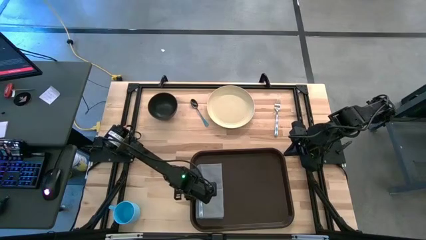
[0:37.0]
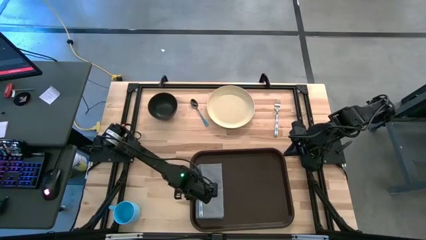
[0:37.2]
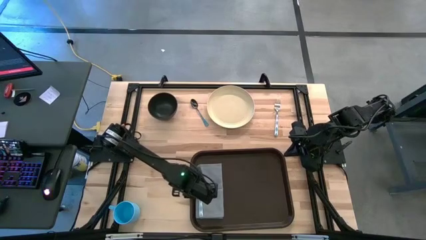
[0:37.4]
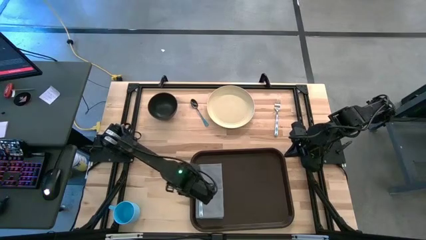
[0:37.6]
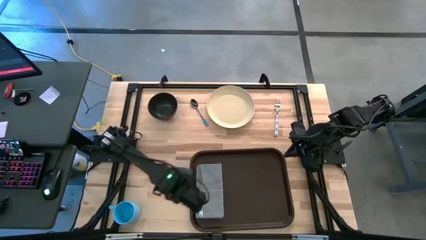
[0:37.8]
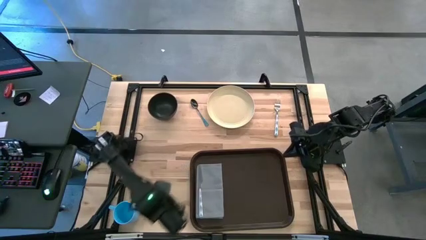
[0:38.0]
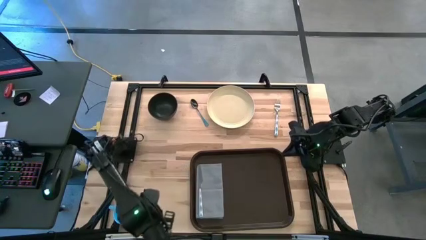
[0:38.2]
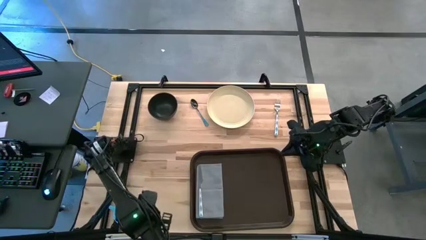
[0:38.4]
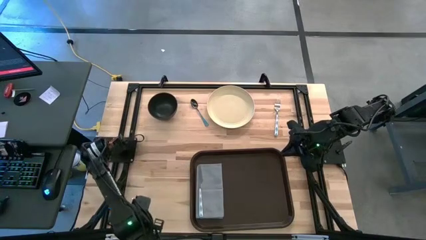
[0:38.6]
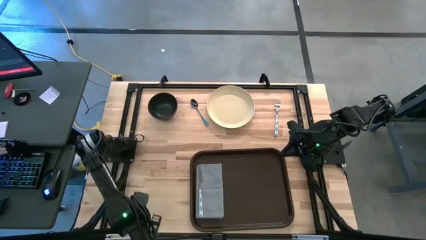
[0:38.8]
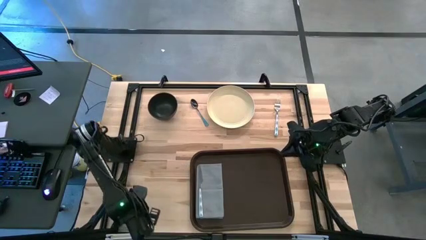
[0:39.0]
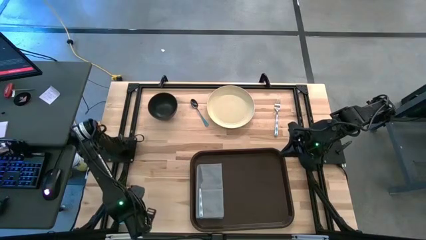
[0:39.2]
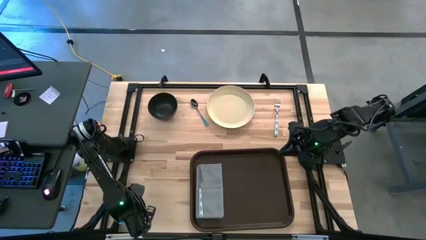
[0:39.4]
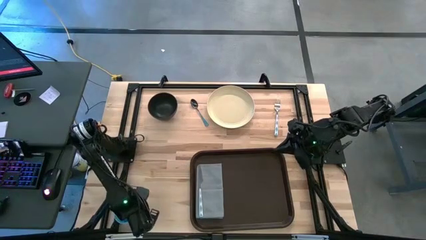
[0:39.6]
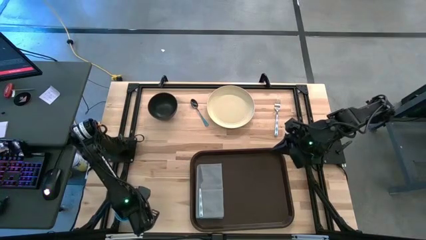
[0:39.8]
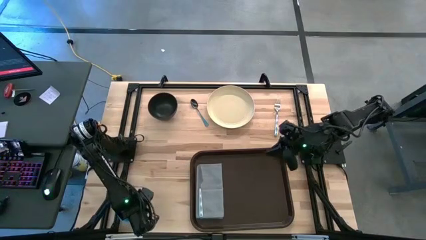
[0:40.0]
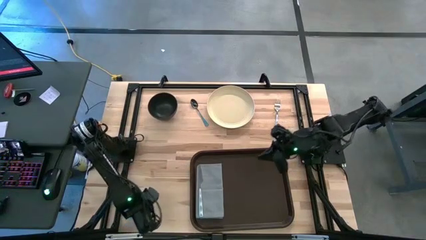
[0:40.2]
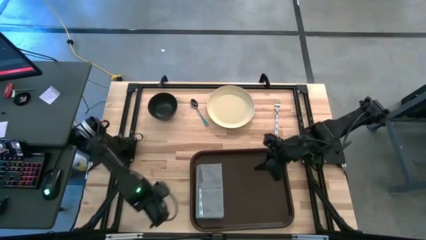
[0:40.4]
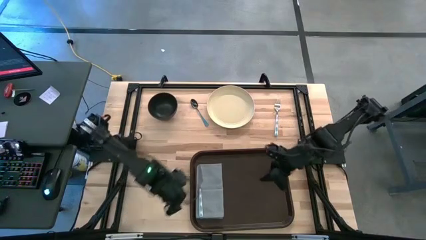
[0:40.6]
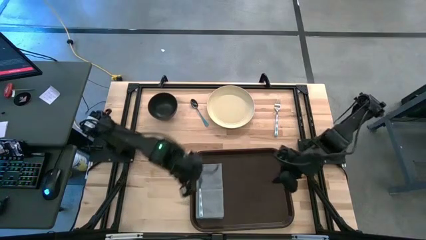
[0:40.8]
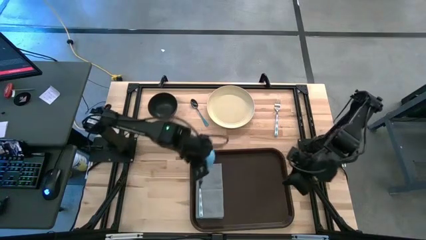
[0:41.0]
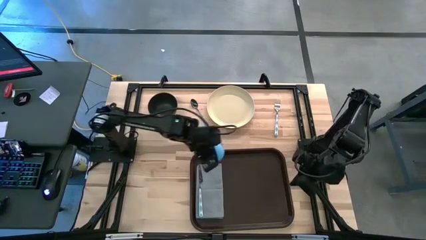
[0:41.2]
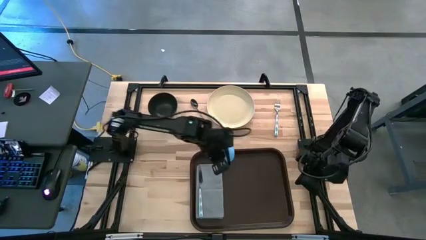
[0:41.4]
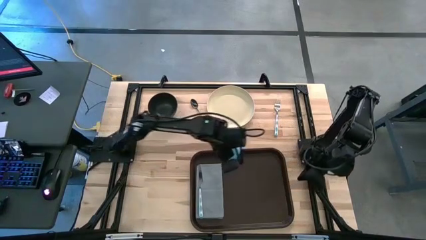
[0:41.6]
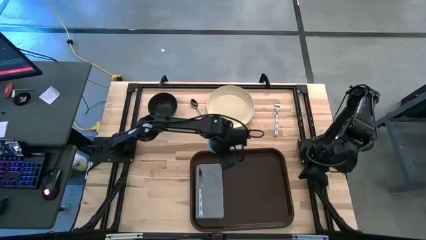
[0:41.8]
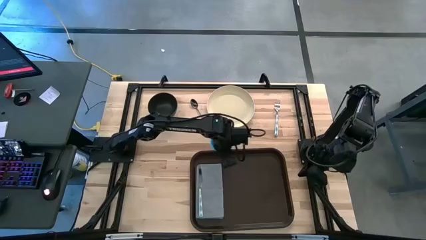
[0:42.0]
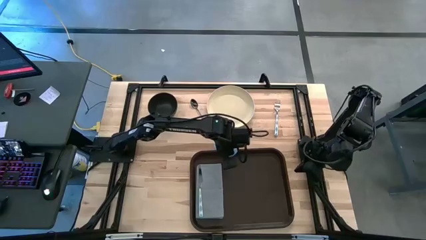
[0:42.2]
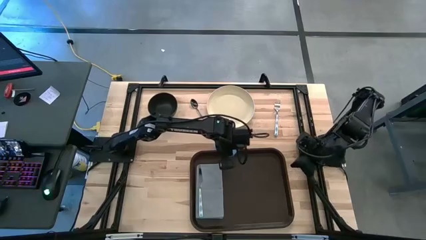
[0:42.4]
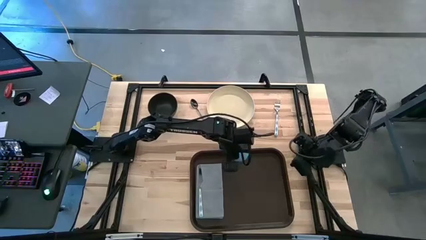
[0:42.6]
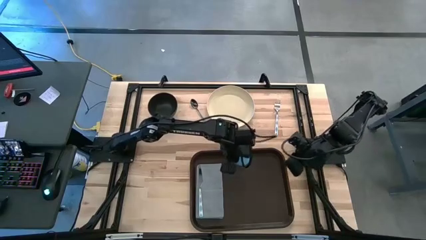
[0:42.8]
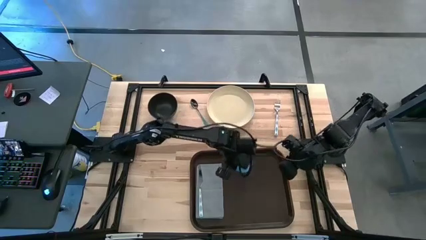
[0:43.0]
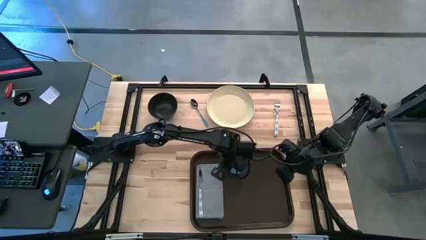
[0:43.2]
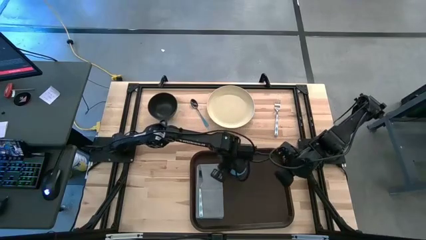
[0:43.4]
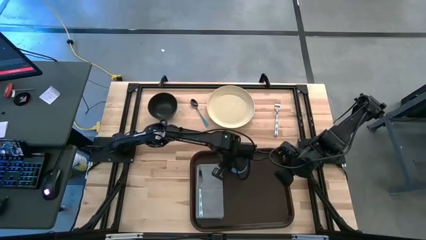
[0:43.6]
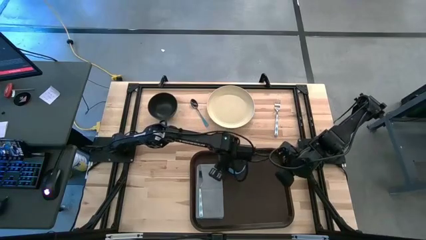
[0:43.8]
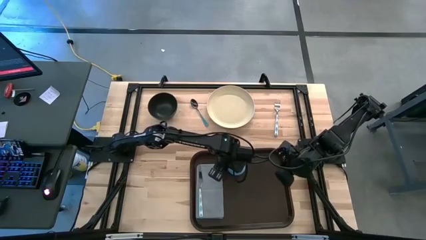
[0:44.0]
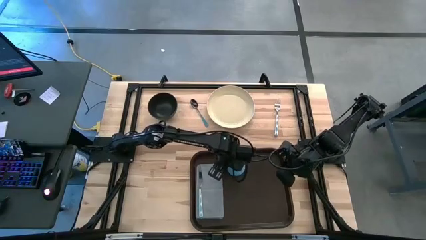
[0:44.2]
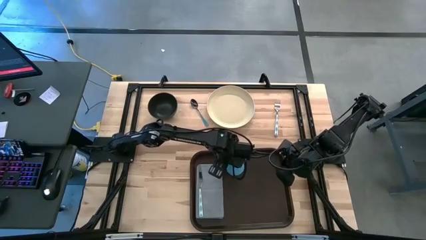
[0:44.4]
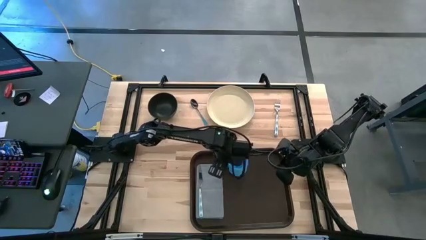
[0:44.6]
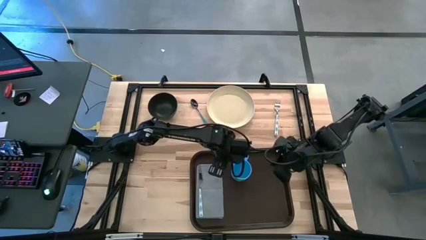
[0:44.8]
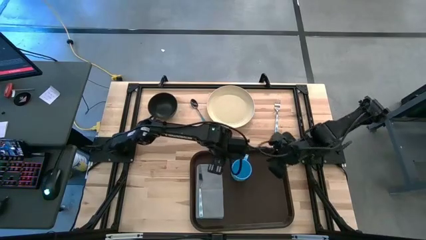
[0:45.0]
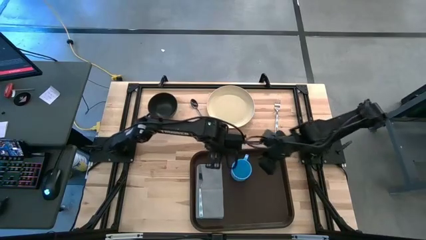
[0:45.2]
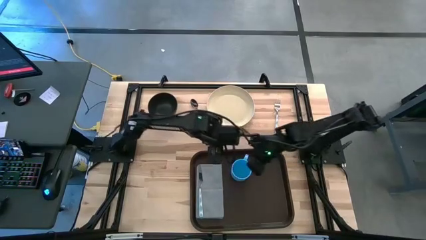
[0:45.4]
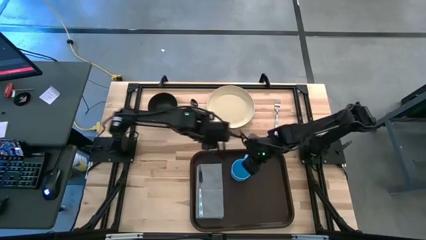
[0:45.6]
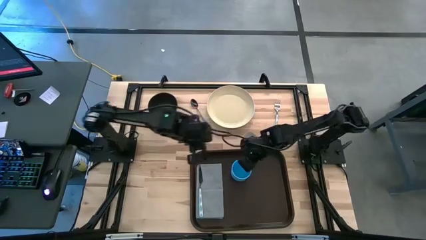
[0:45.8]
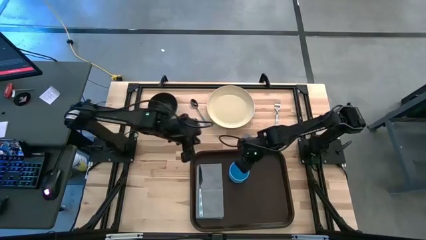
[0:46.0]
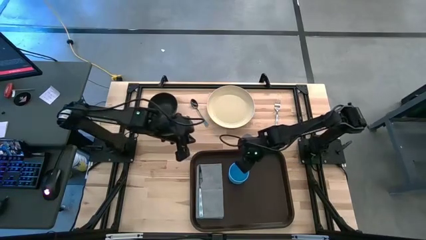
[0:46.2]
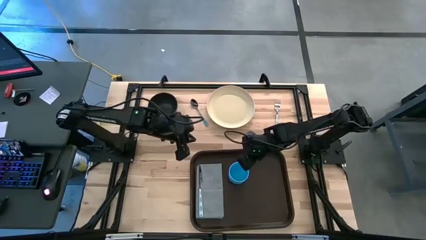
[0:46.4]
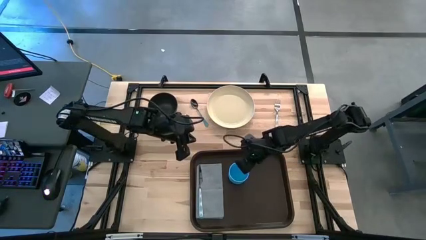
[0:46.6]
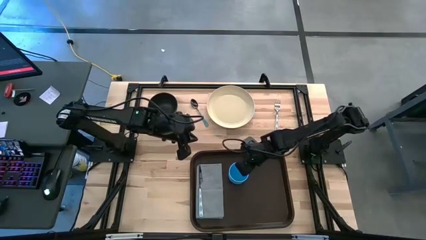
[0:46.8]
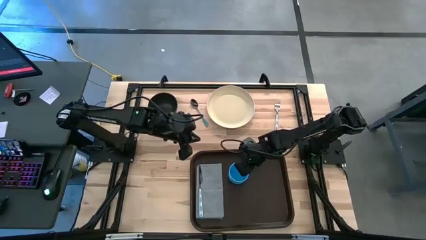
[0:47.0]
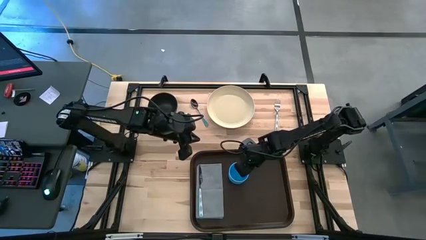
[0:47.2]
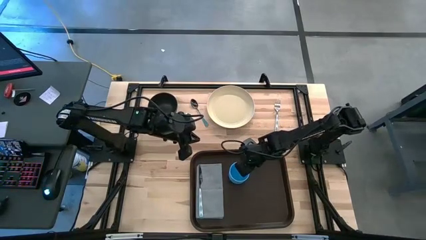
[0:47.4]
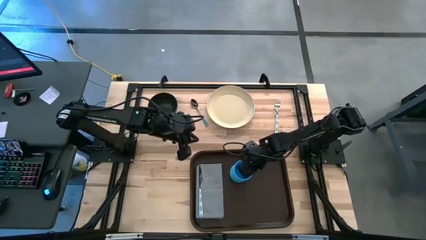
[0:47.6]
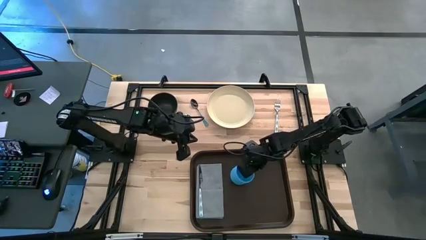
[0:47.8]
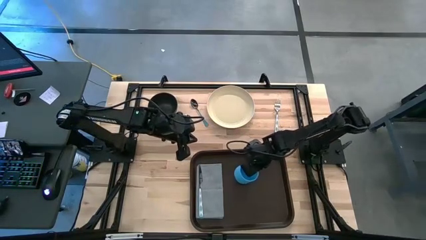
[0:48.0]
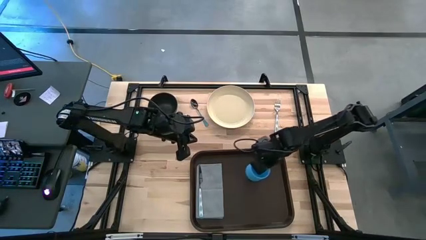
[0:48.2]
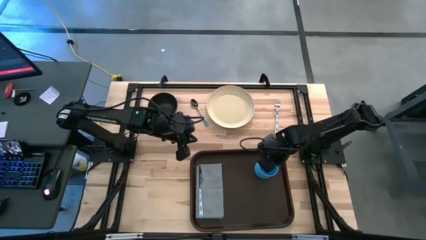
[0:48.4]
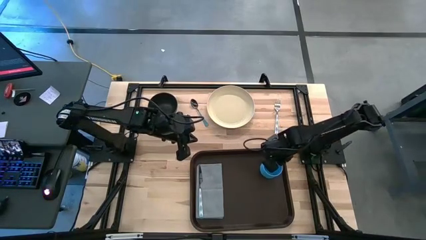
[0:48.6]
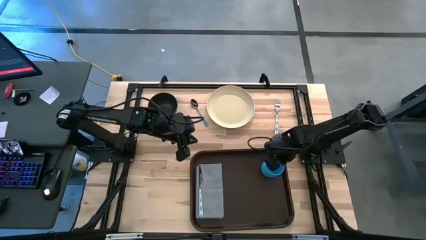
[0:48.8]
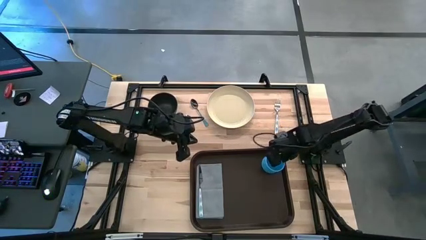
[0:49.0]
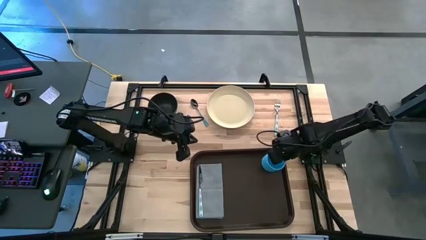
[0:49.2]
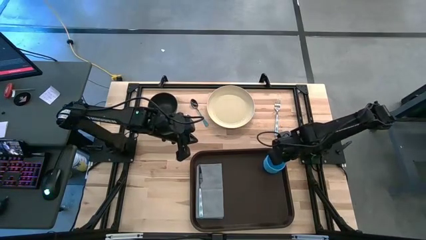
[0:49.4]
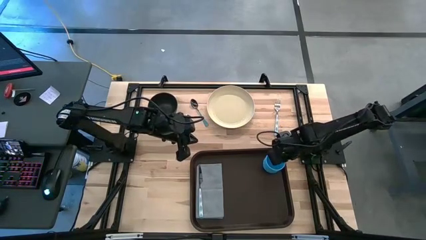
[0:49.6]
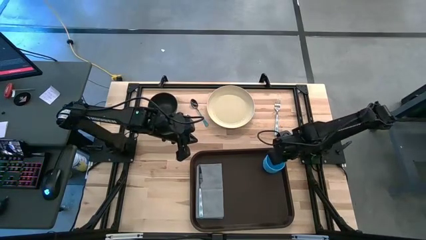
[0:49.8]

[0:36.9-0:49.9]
Task: Set up tray
Put the blue mug on the brown tray

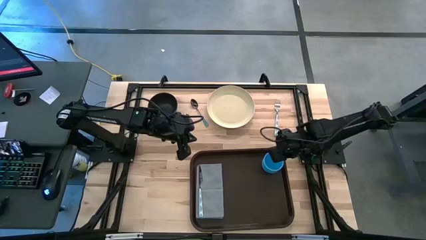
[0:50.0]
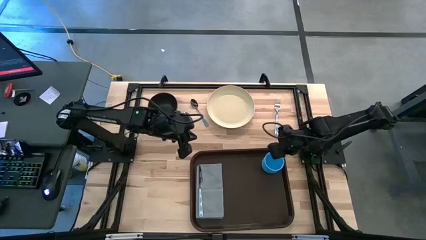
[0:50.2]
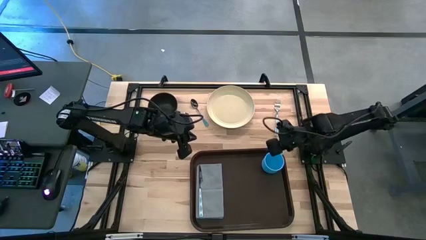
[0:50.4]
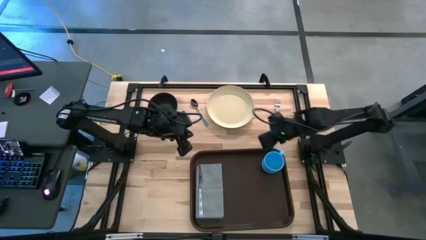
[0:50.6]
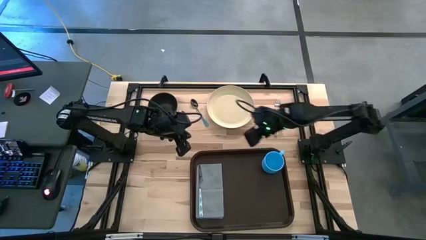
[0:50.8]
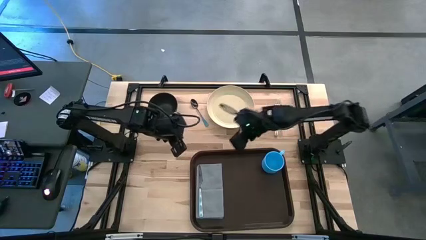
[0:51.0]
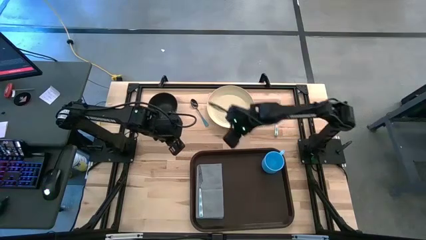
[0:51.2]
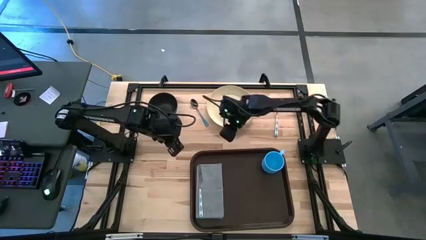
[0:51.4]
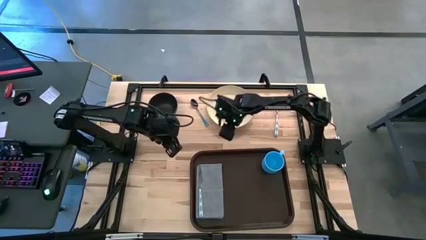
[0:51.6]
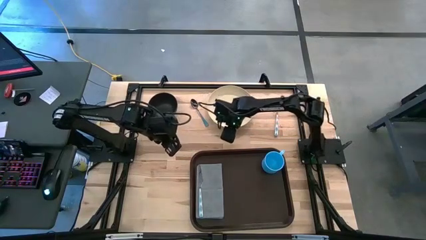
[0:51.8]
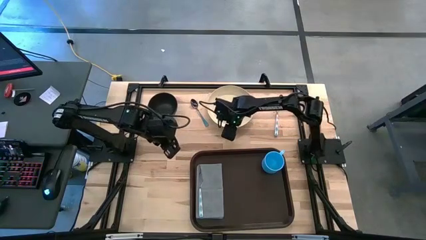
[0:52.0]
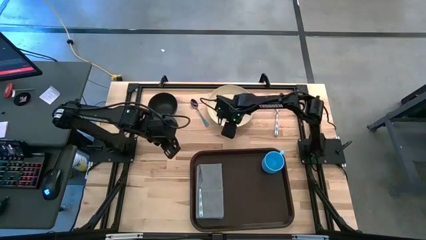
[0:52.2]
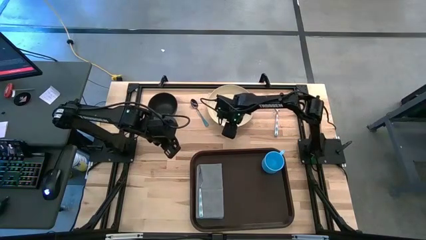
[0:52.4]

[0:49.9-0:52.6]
Adjust the white plate on the table
